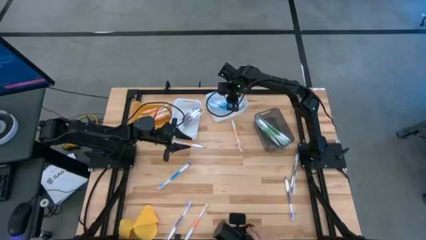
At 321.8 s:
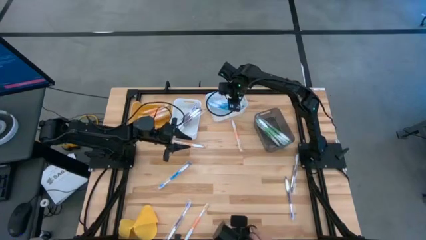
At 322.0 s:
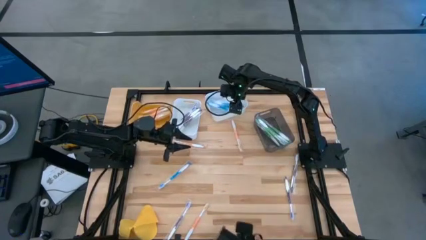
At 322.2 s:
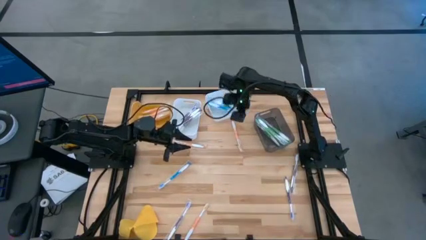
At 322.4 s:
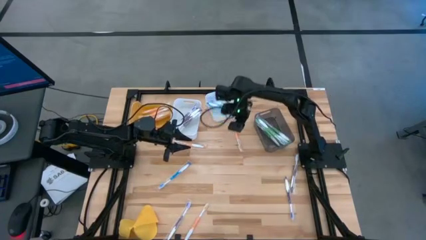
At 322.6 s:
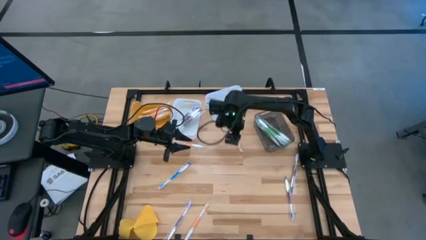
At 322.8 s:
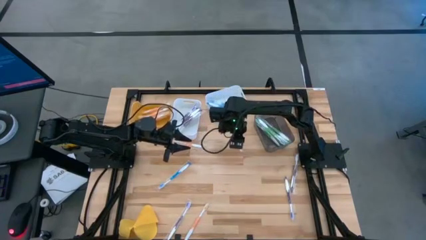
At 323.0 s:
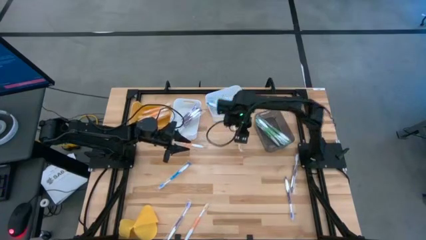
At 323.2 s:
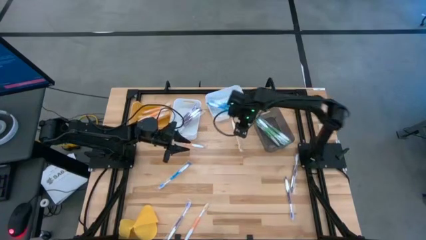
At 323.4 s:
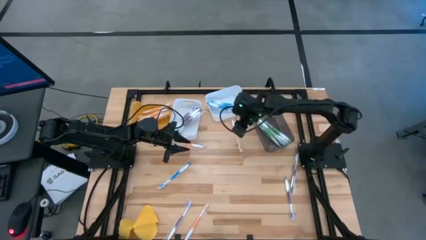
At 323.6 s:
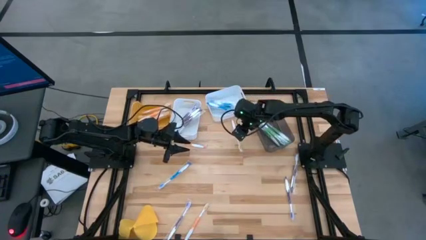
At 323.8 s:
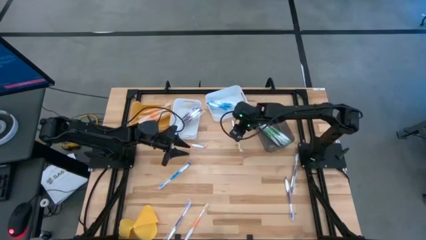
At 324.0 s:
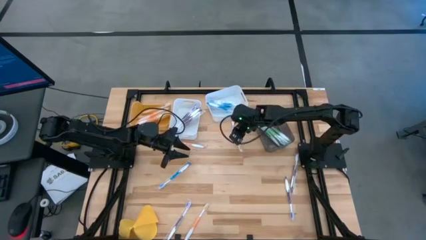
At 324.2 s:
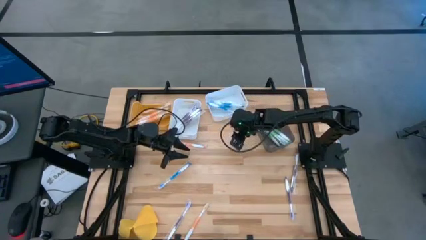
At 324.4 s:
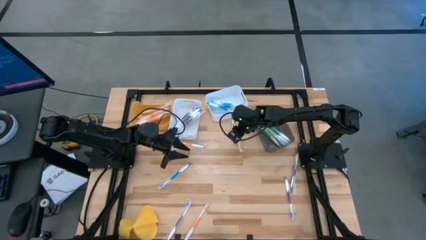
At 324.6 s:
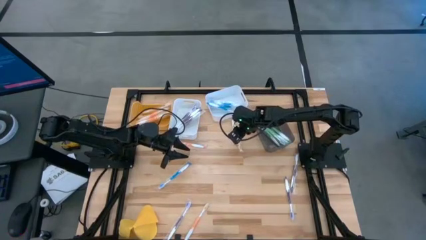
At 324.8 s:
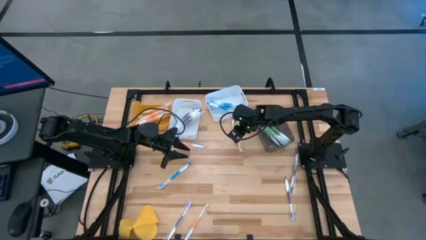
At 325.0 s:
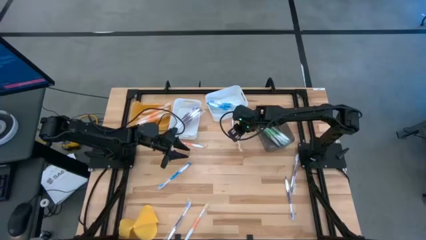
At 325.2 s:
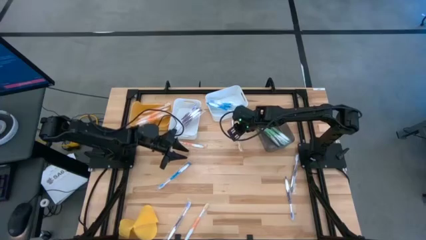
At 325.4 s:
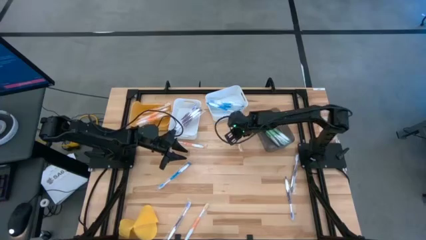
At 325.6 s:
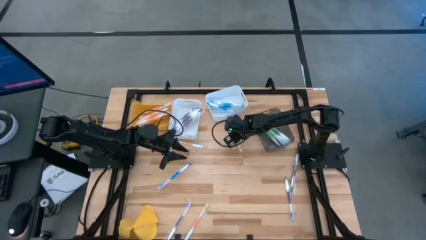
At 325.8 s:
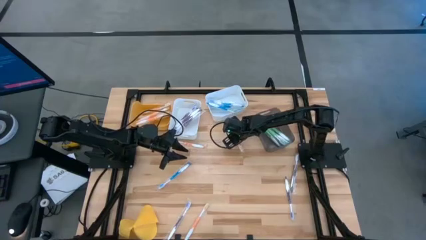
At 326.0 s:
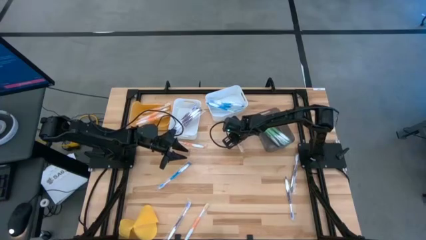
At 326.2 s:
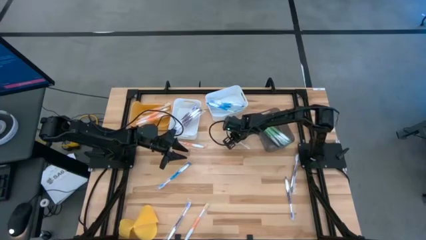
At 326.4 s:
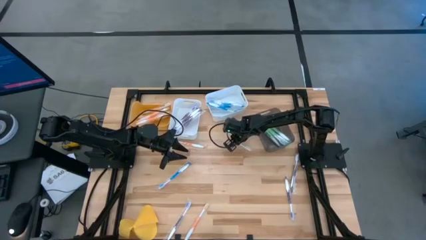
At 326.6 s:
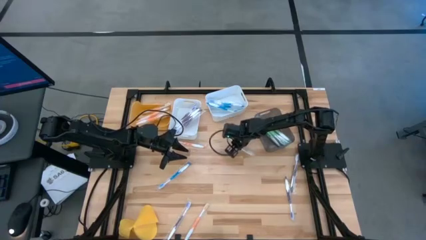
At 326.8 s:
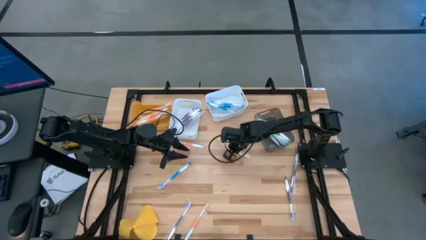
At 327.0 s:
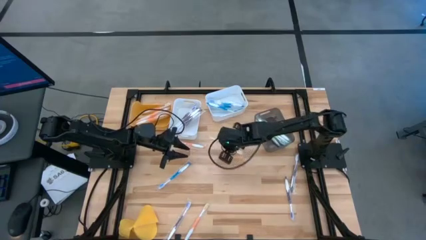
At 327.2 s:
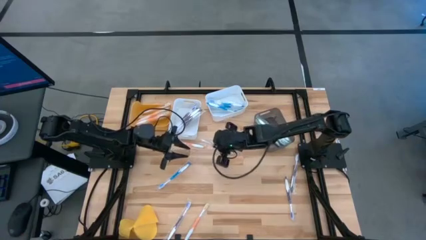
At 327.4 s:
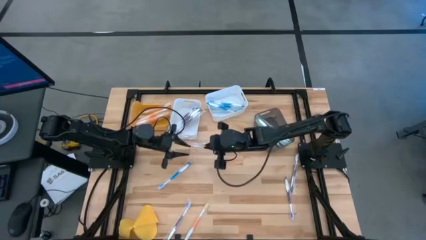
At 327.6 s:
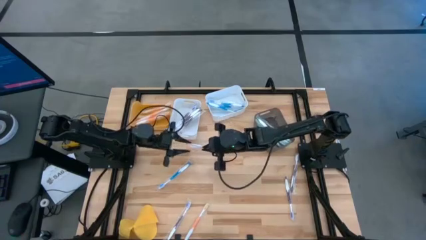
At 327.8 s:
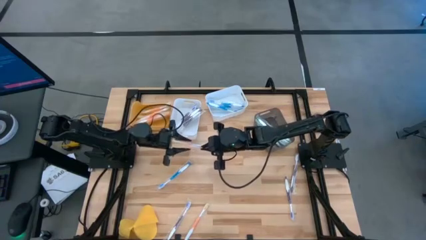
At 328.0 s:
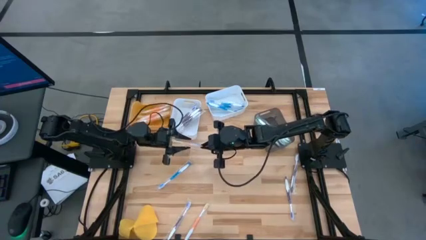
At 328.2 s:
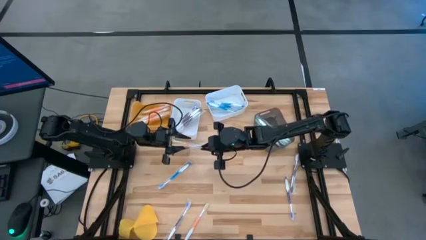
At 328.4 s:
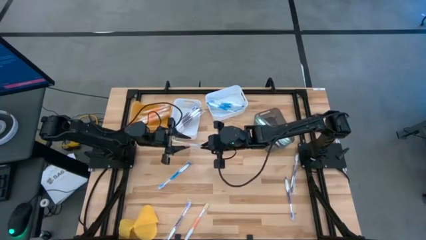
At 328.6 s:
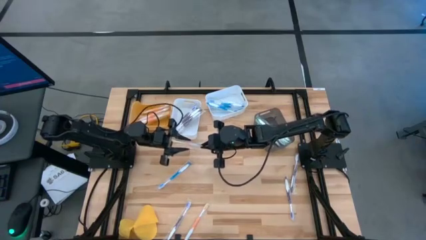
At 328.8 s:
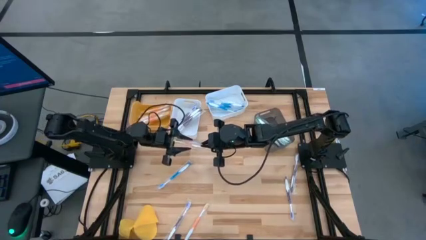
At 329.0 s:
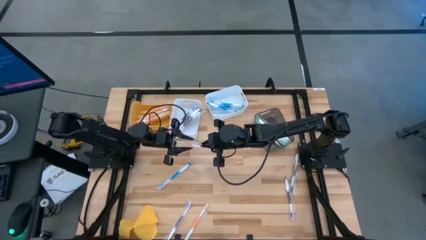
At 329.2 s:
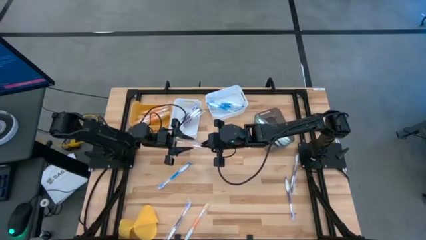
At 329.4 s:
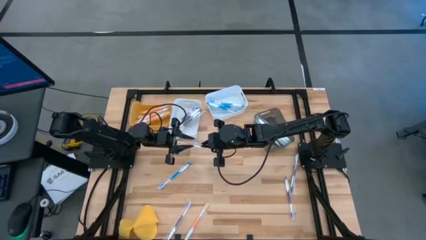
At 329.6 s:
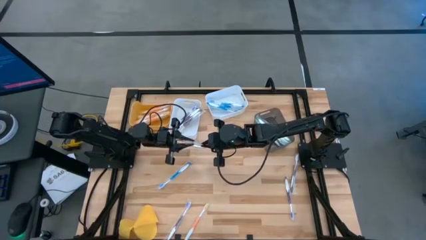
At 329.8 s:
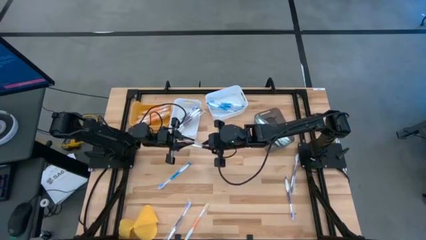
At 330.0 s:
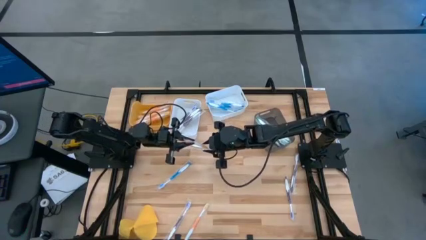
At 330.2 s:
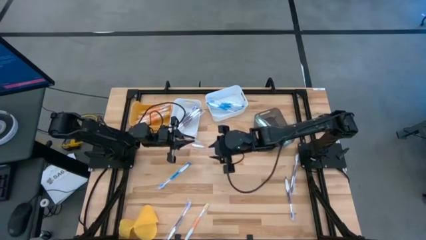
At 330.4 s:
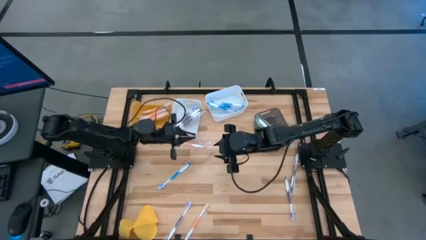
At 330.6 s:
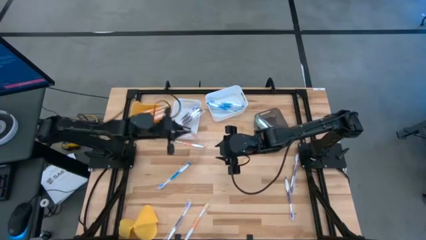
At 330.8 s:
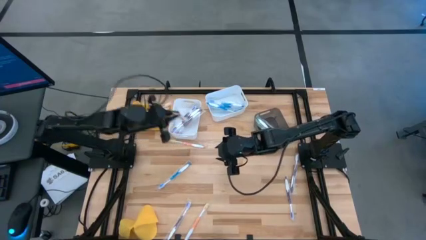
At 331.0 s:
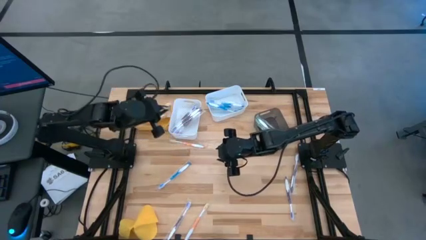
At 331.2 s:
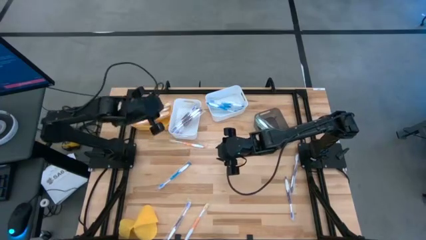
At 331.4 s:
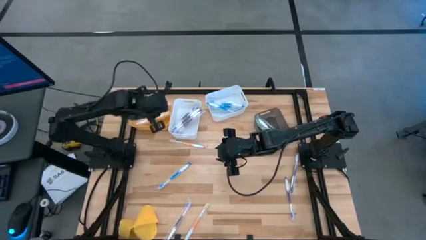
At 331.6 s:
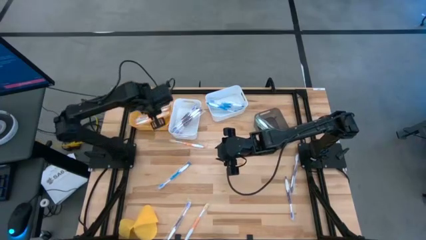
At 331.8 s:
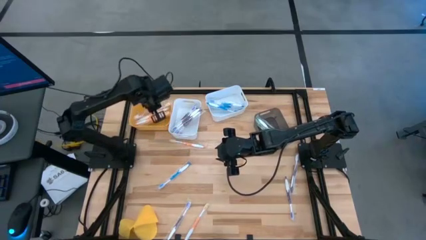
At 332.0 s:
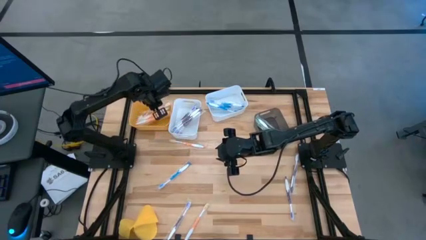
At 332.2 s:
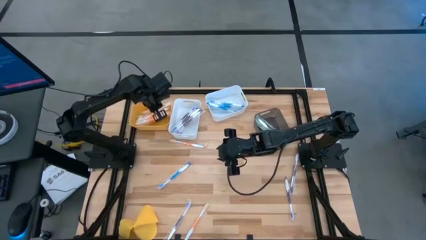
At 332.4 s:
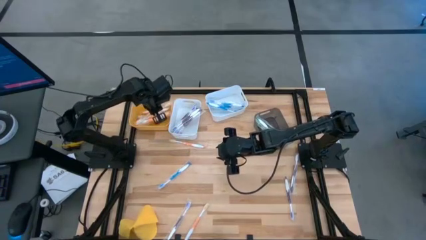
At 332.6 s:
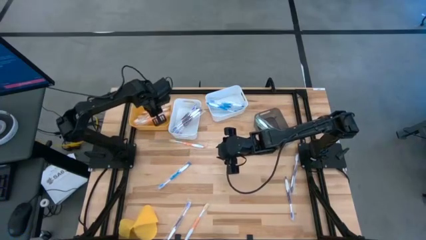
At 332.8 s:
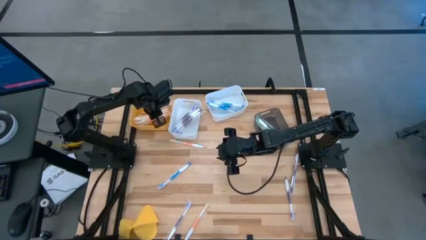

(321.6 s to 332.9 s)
Task: Pick & Place Toothbrushes
Put the orange toothbrush into the yellow bin
